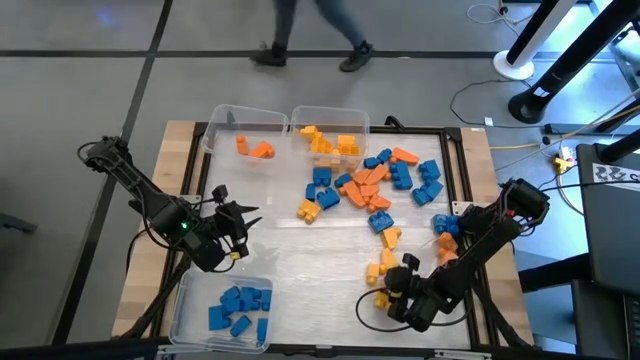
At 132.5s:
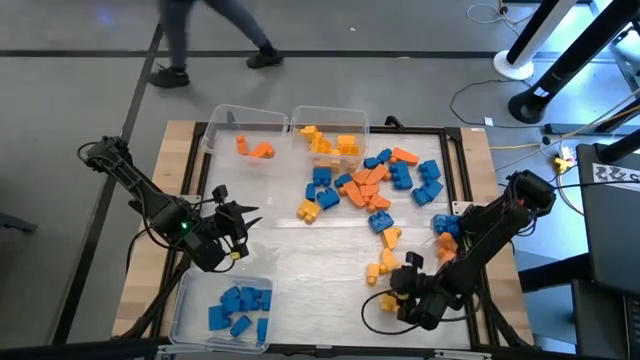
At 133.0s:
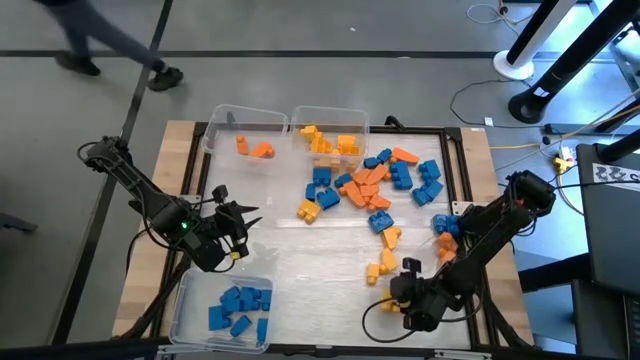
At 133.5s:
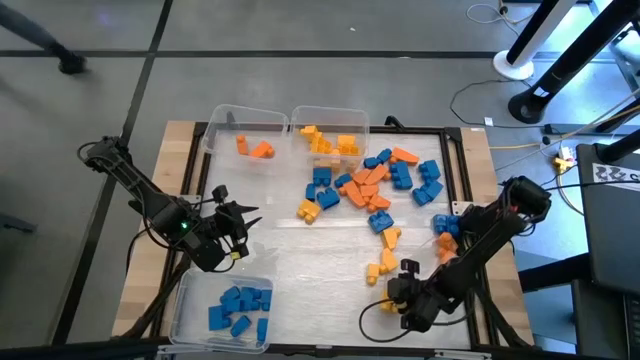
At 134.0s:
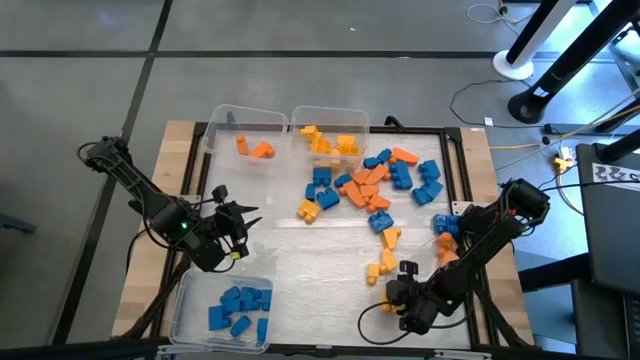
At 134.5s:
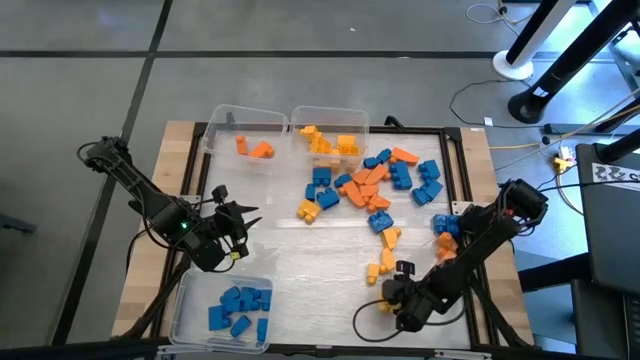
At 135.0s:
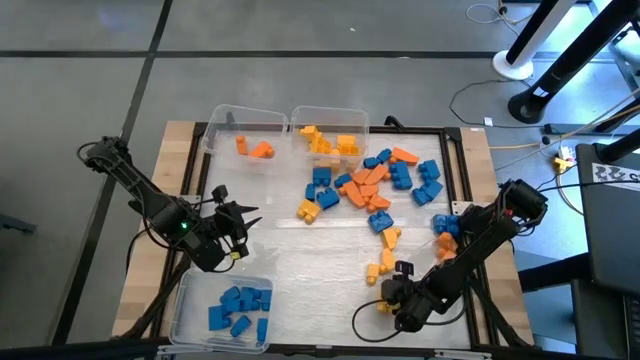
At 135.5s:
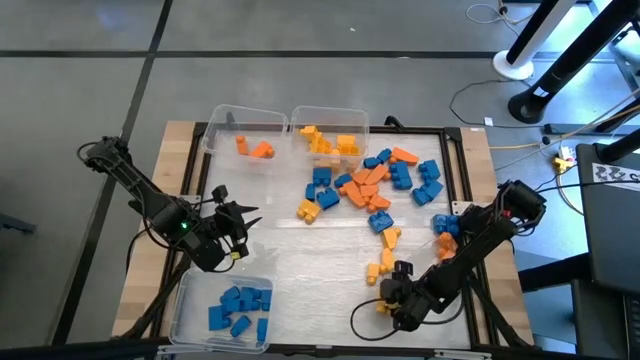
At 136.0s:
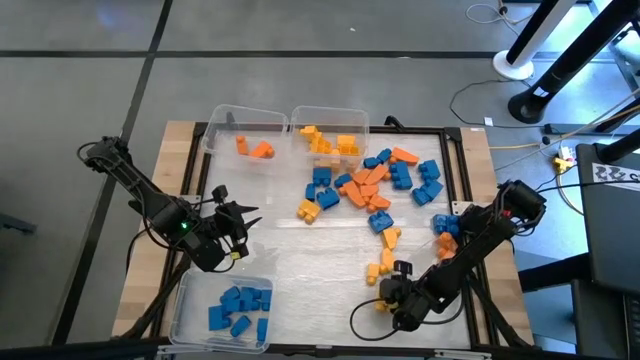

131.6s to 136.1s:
Task: Sort blocks
Put the yellow game piece into the top right transparent bin

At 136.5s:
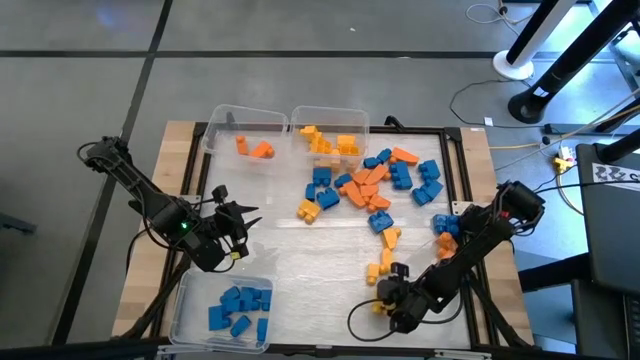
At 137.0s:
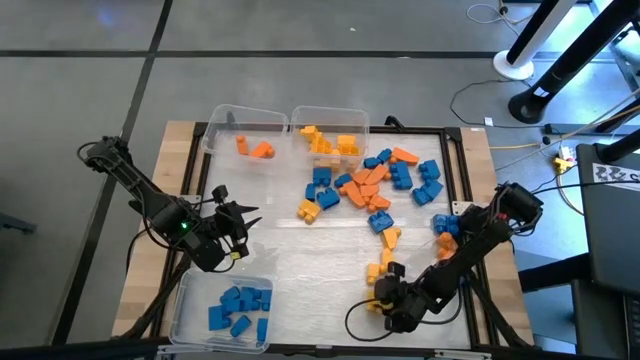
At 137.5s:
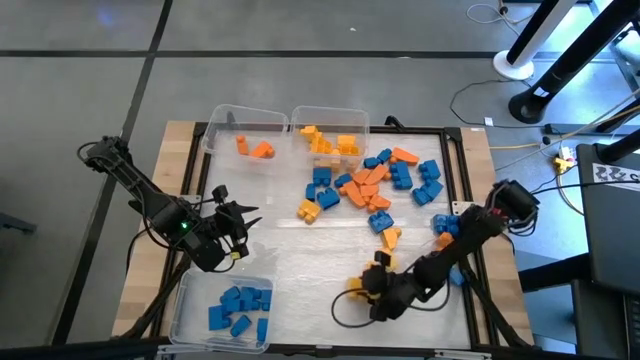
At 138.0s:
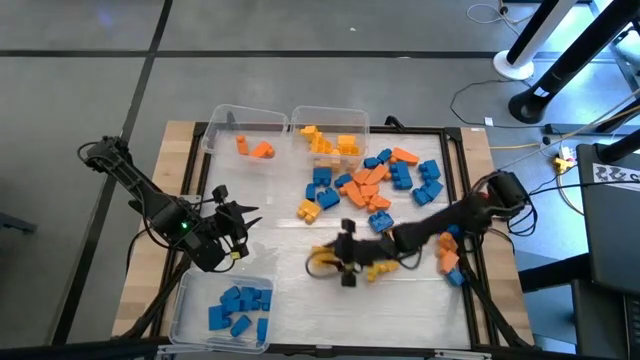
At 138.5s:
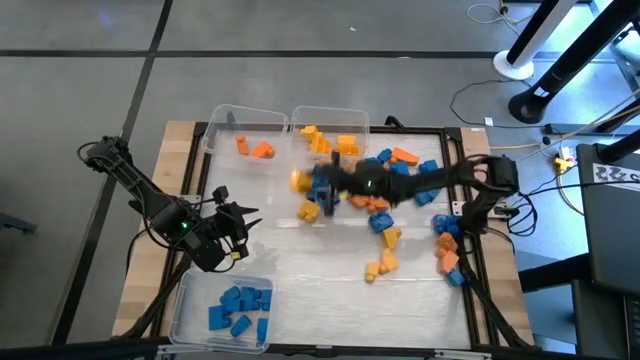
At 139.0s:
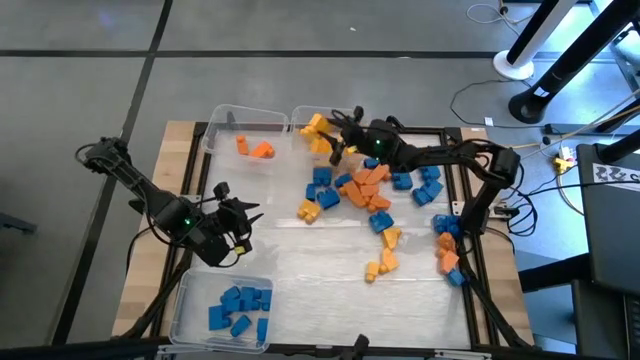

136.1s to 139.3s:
Put the yellow game piece into the top right transparent bin

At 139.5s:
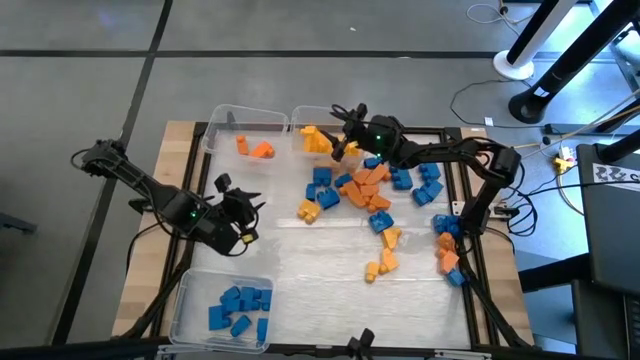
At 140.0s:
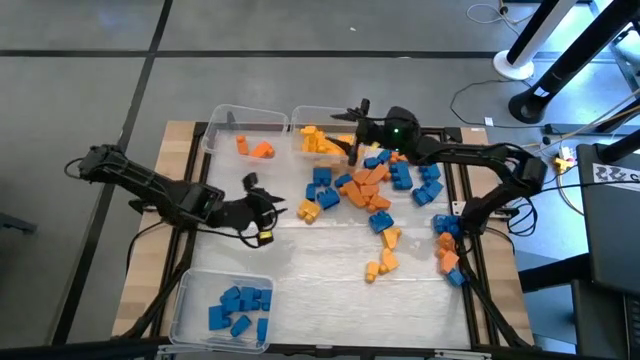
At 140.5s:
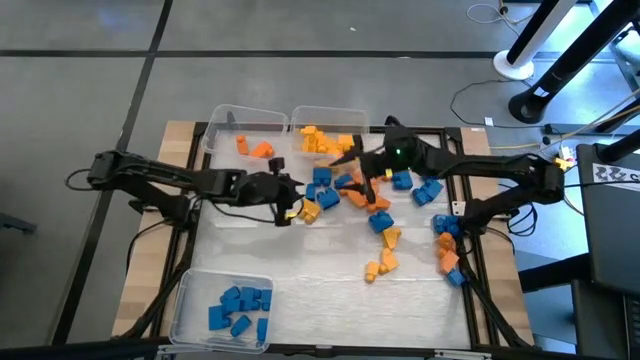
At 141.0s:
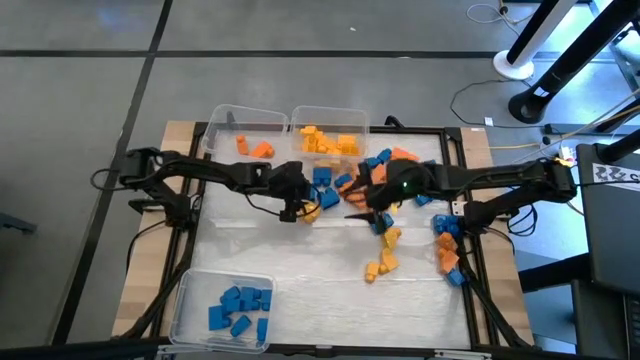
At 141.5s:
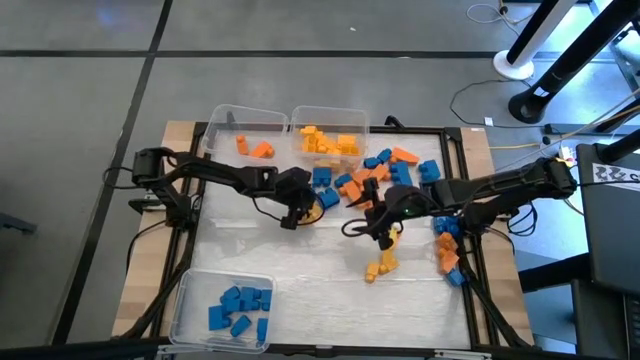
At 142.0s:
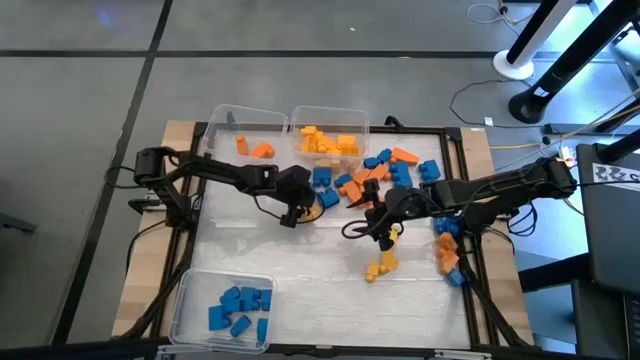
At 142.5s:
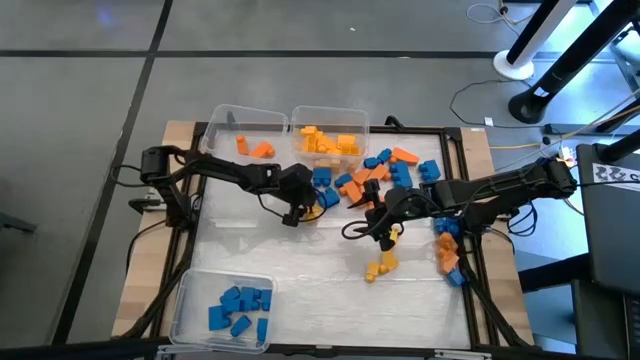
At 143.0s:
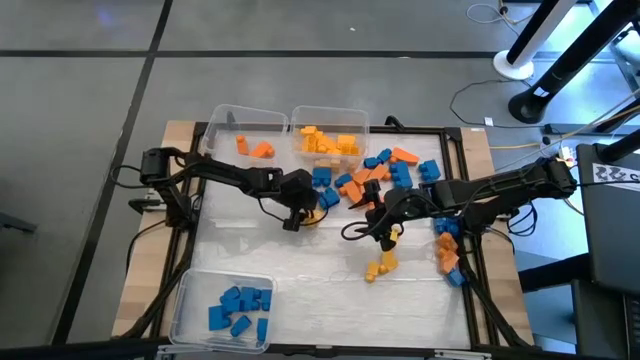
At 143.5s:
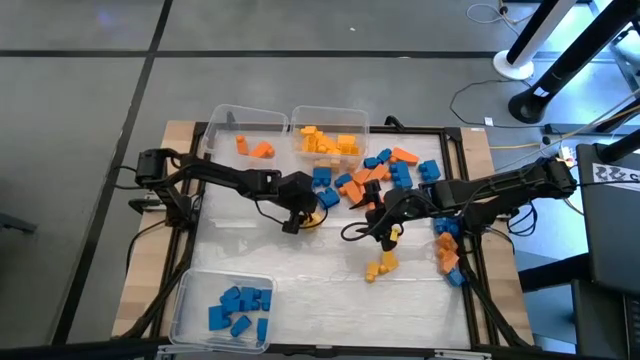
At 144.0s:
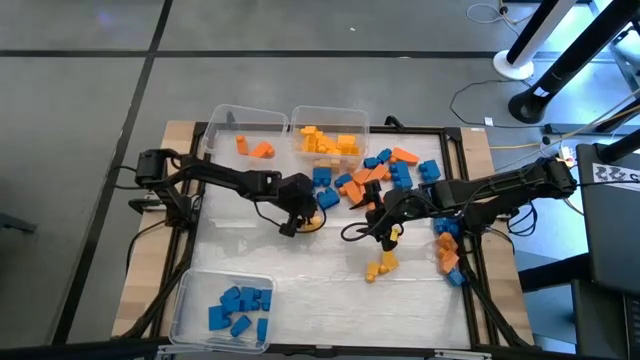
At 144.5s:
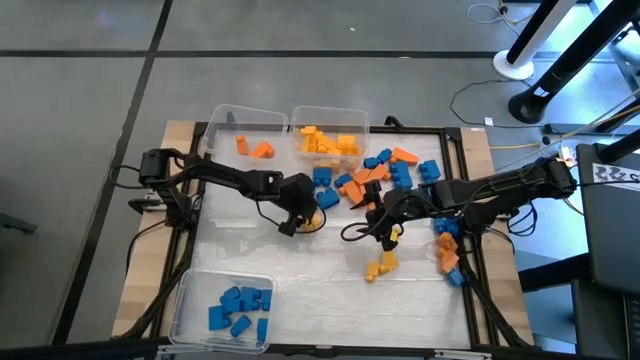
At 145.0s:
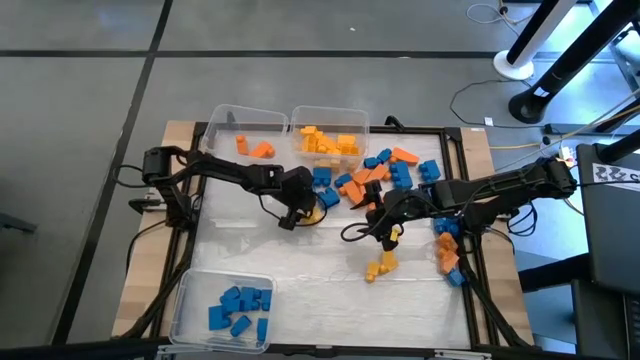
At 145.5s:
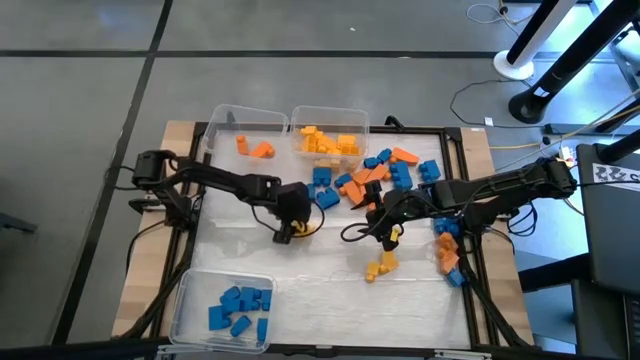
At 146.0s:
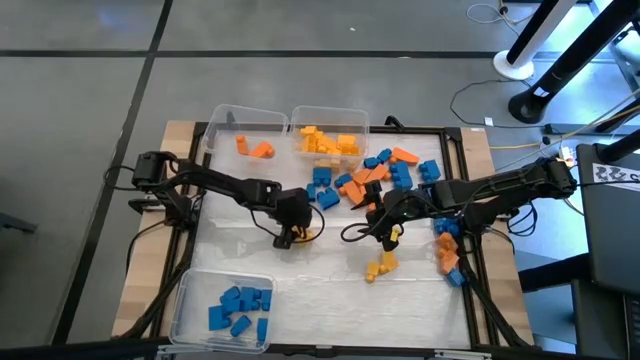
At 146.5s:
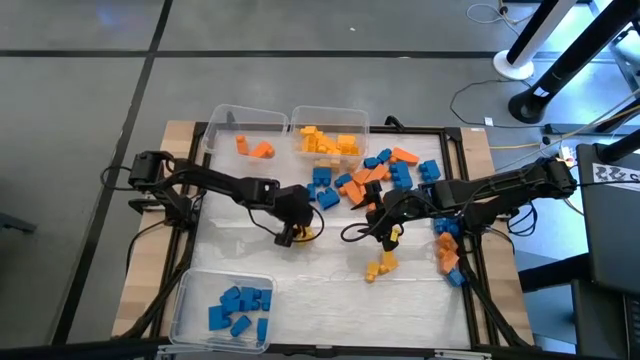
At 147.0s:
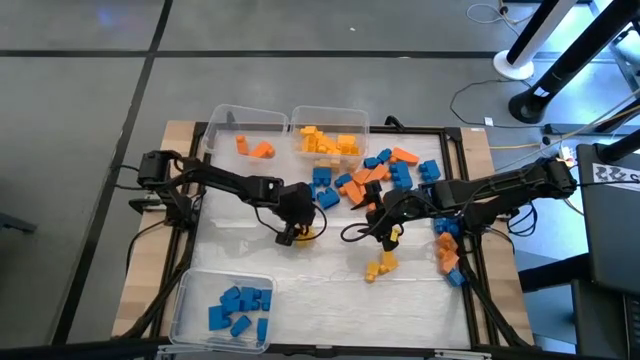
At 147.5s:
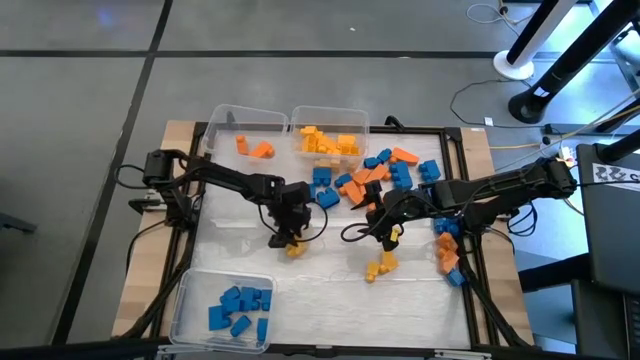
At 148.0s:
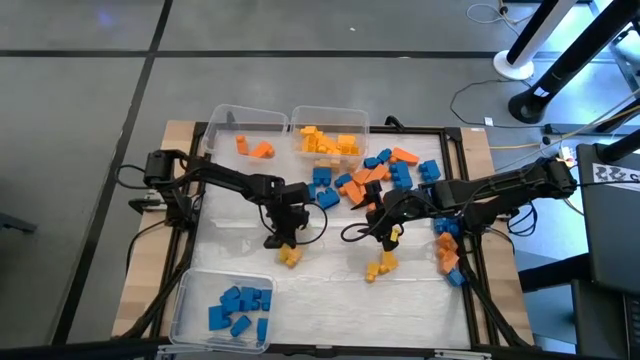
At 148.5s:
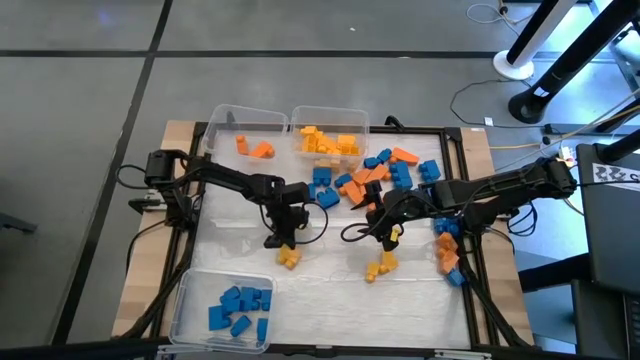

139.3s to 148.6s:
Put the yellow game piece into the top right transparent bin

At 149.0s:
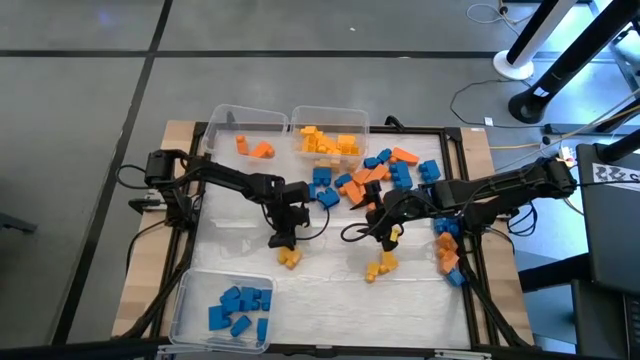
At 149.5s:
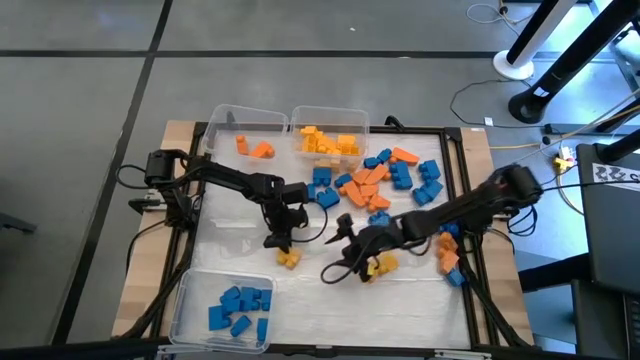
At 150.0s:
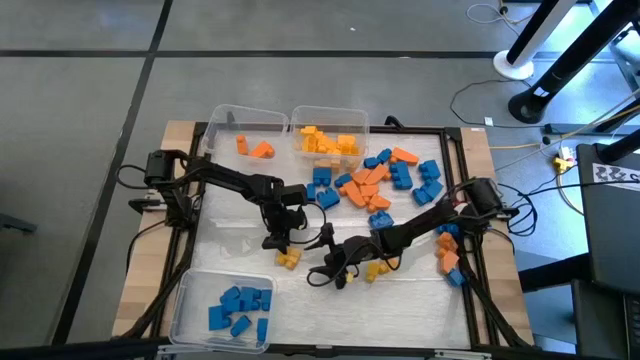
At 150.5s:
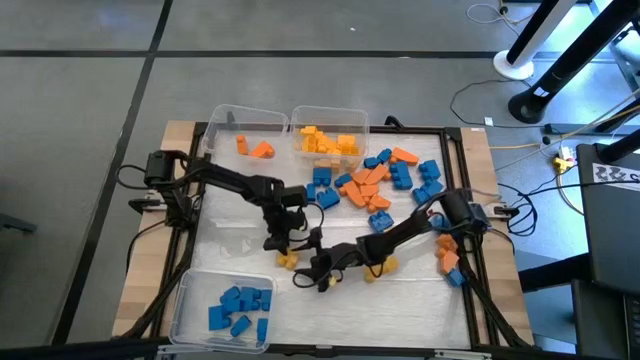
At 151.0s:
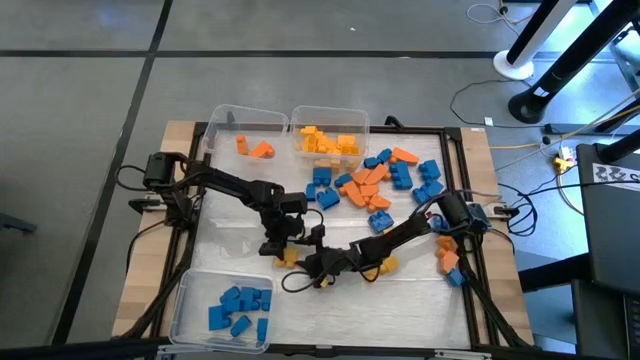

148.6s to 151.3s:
Put the yellow game piece into the top right transparent bin

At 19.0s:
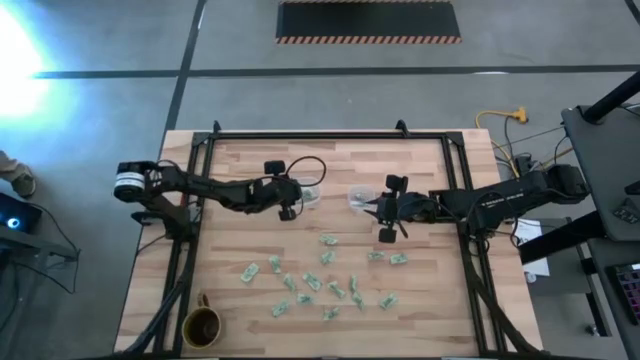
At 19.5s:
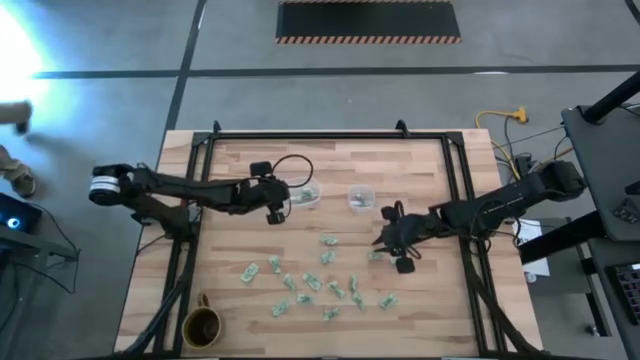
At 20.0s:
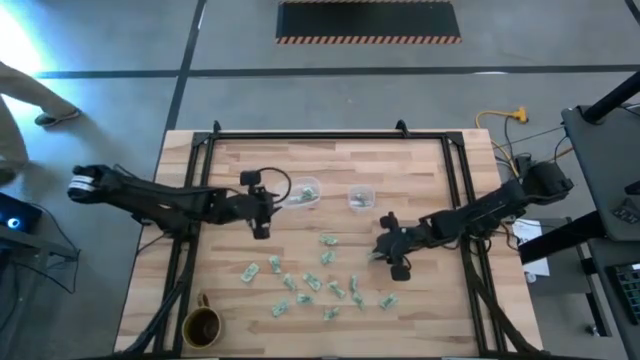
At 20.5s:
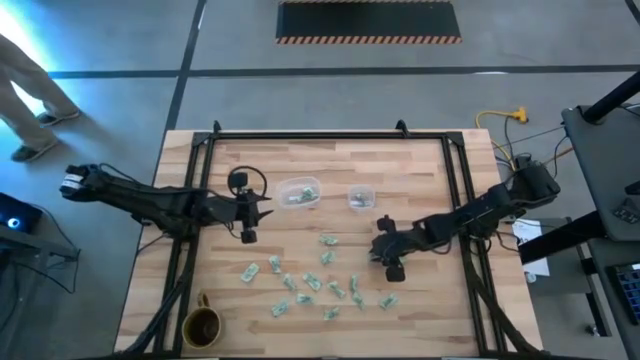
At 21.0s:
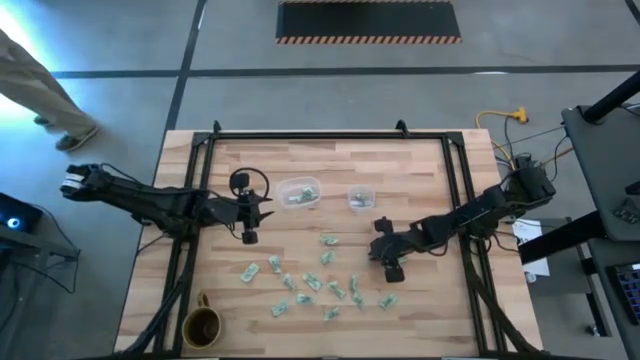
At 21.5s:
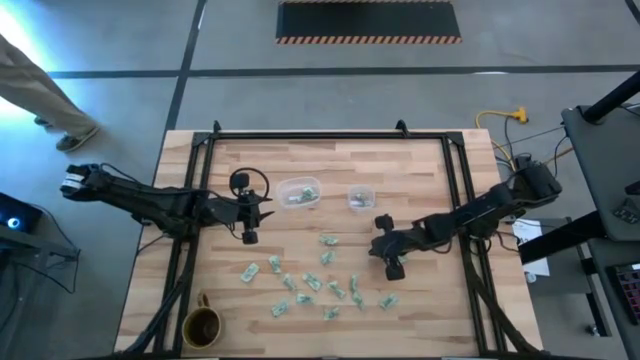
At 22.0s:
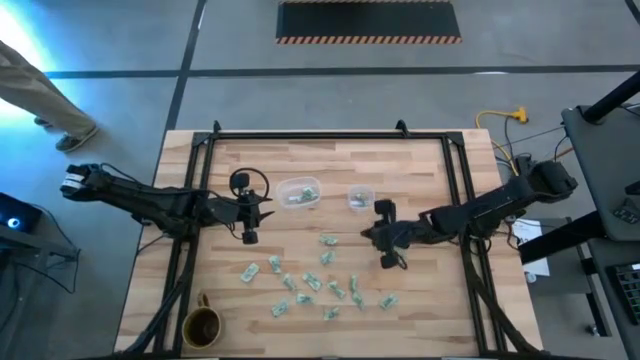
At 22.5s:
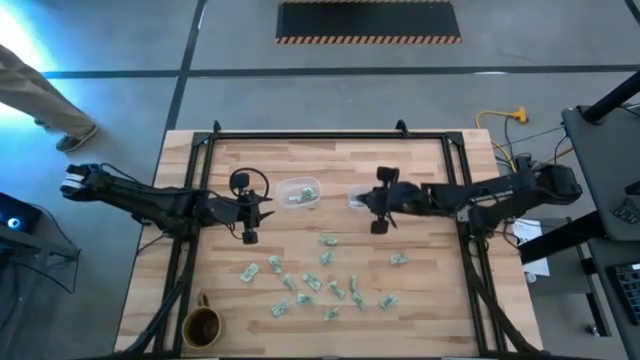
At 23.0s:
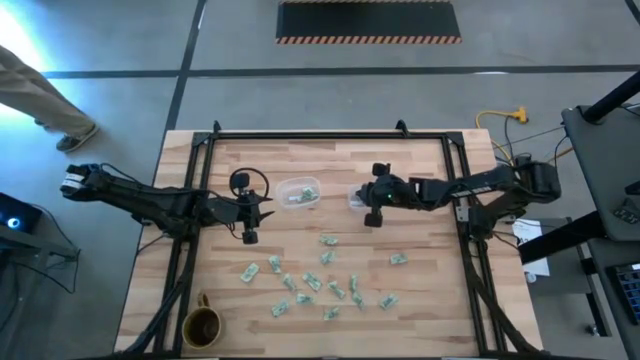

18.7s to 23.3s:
Task: Pick and place Stevia / Truvia into bins
Put the stevia packet into the transparent square container
